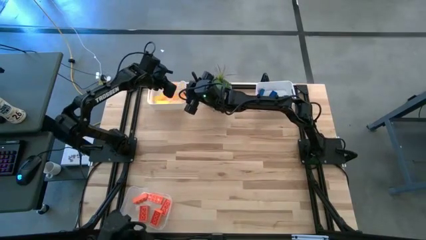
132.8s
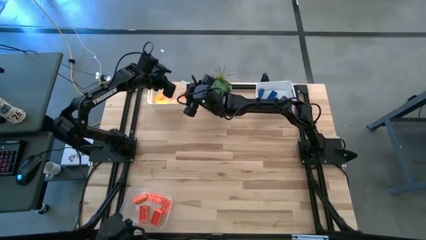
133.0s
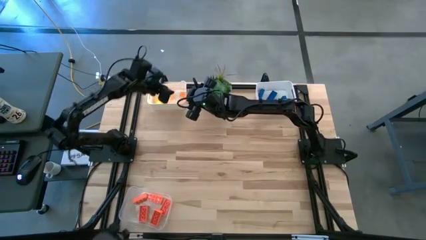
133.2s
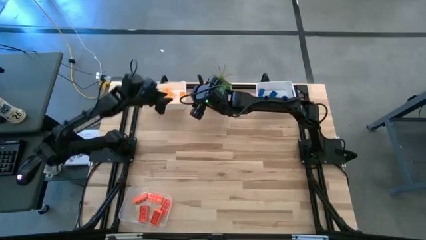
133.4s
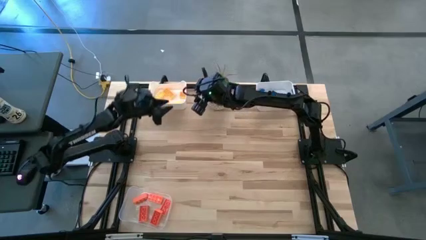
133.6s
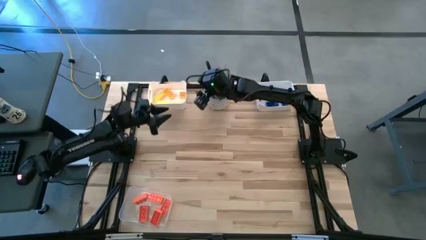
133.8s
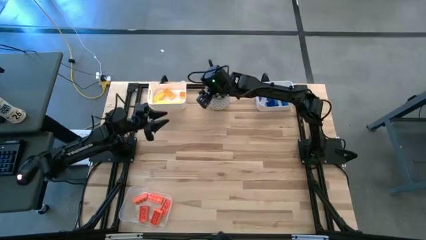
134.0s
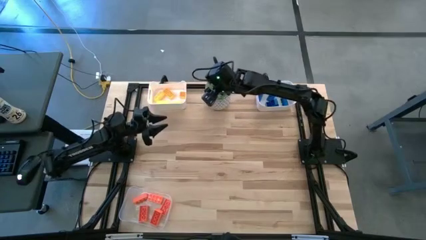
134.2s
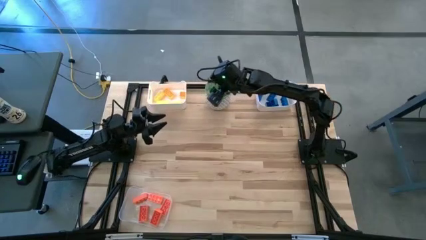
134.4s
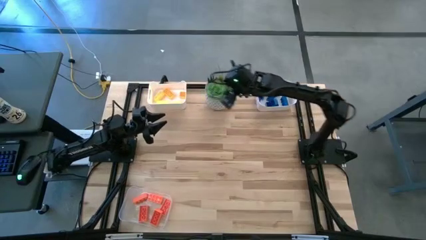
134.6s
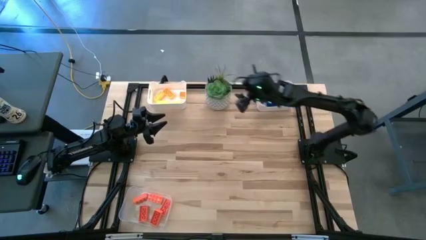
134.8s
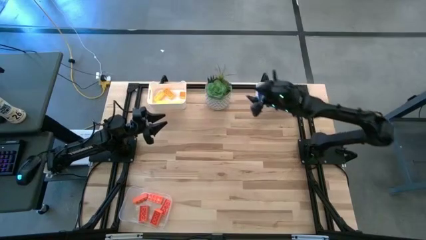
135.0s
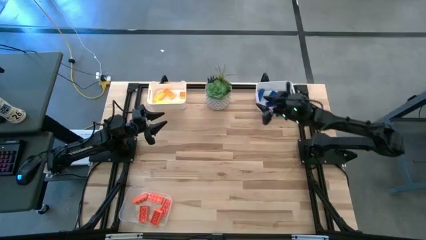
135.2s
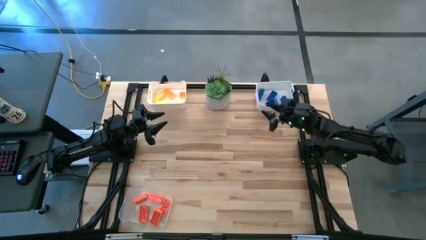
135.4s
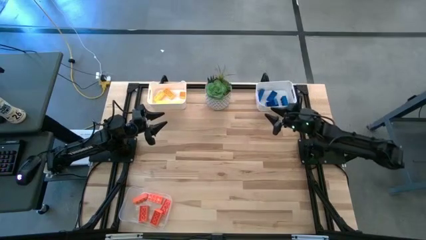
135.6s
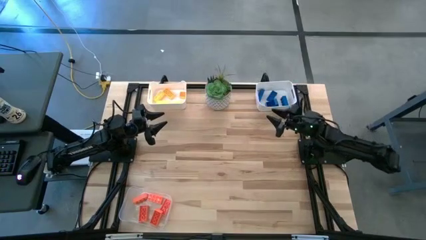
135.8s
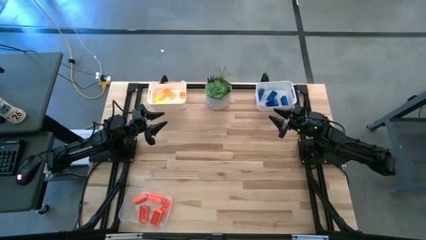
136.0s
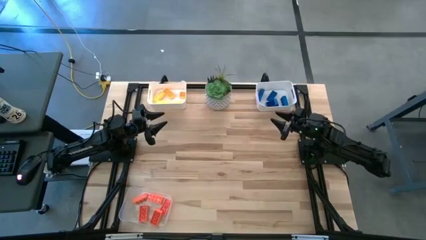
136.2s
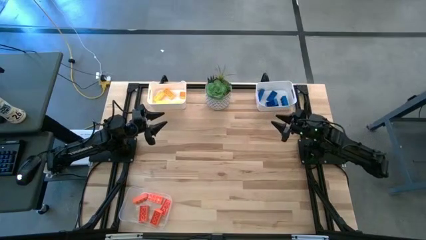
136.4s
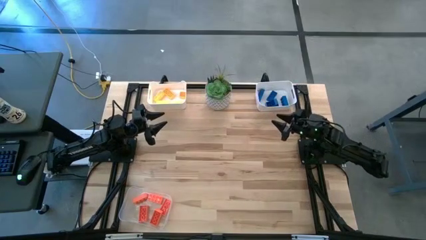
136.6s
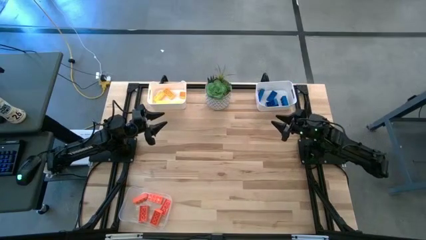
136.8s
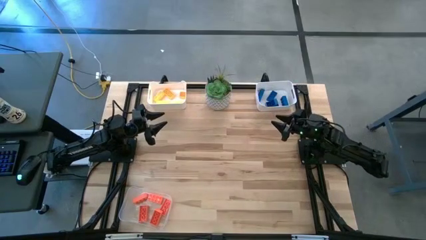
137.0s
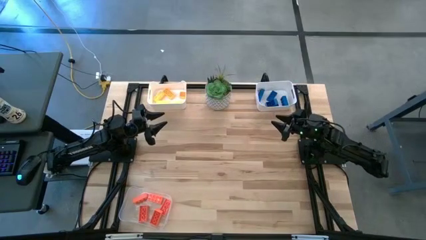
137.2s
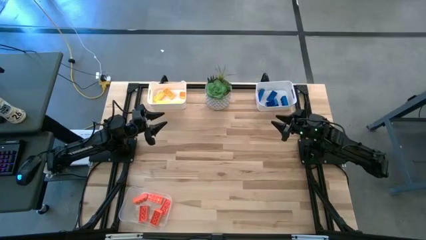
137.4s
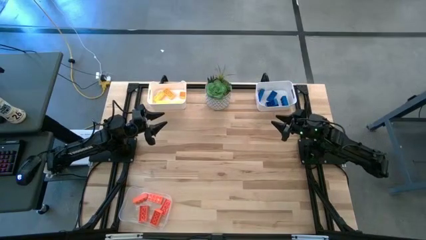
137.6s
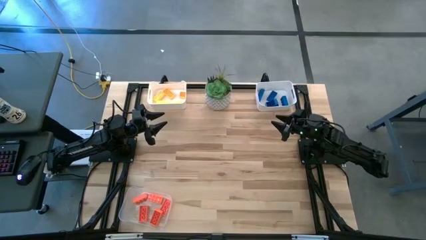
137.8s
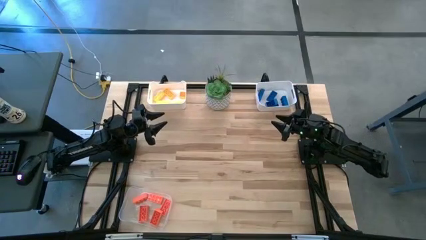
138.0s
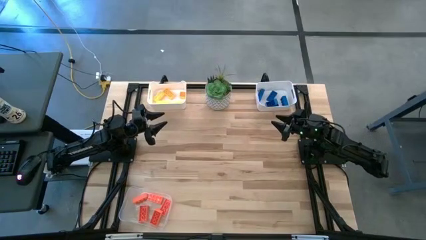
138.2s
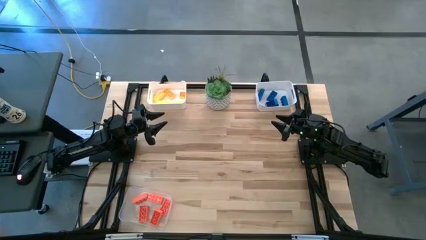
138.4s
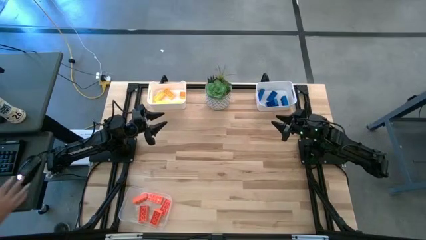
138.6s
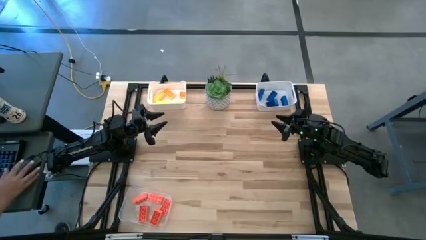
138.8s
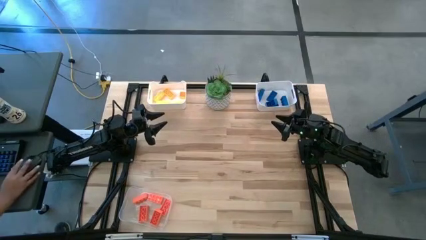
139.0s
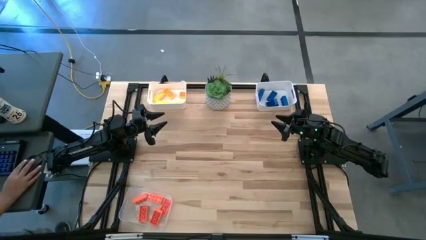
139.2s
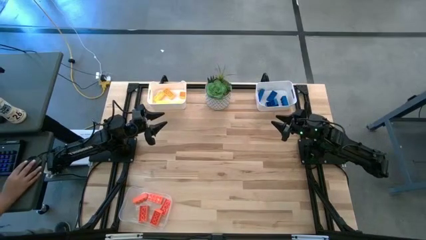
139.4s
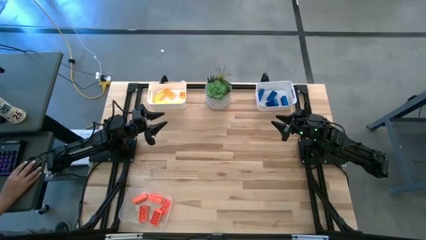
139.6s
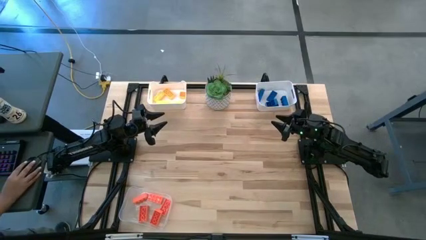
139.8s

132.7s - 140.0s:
Task: Sort & place blocks by color
Return to Home Position

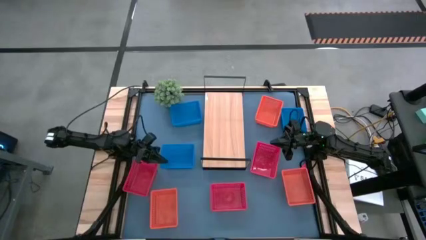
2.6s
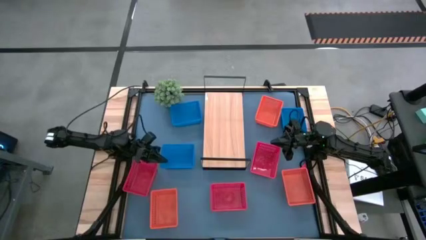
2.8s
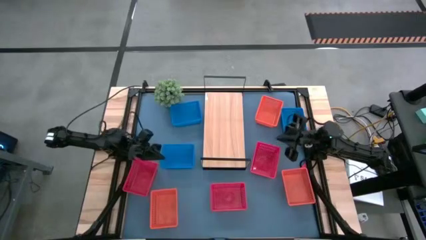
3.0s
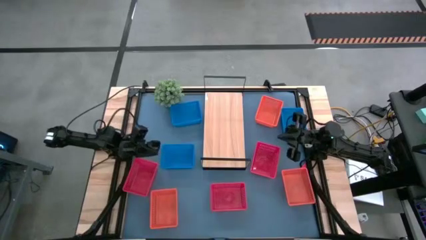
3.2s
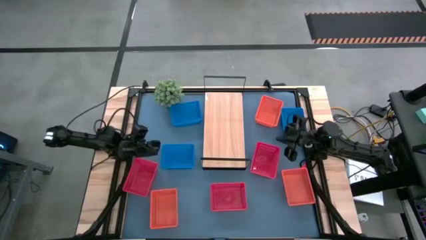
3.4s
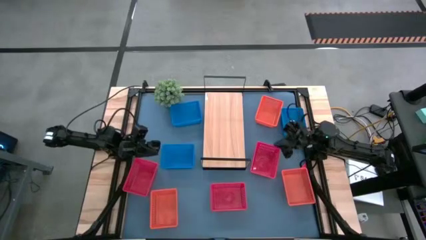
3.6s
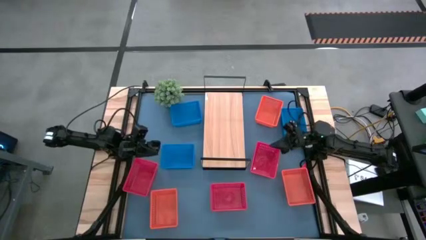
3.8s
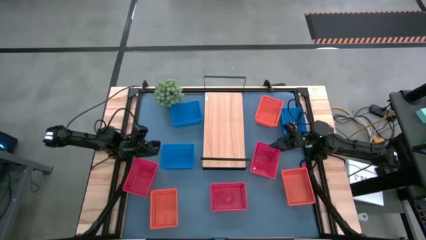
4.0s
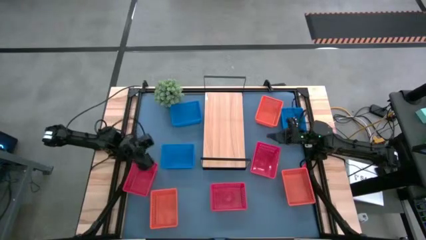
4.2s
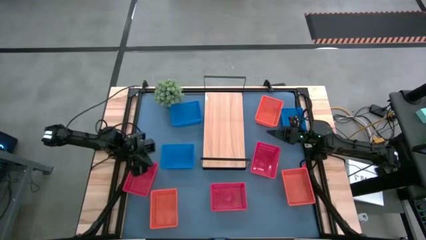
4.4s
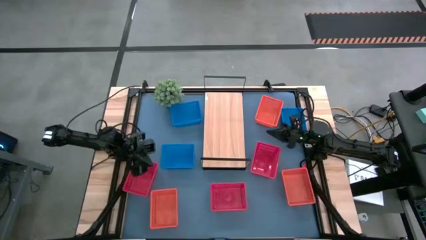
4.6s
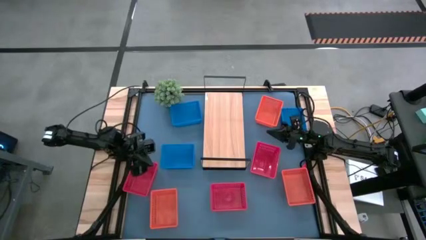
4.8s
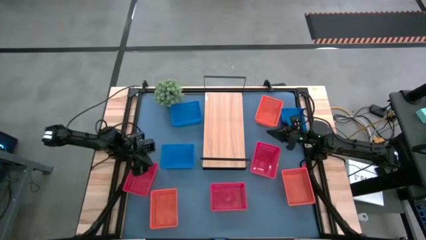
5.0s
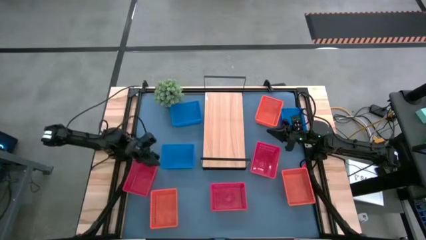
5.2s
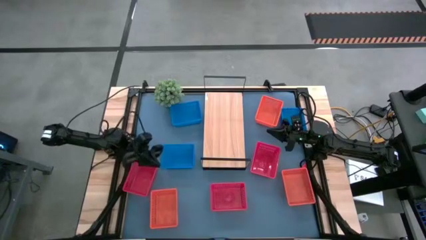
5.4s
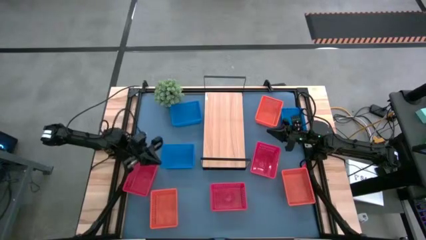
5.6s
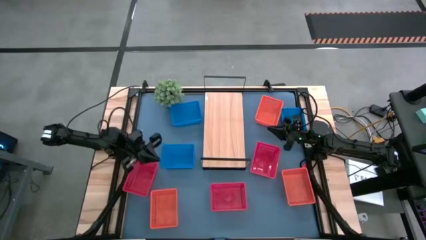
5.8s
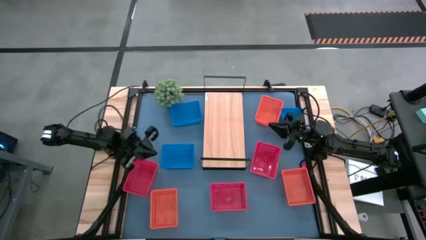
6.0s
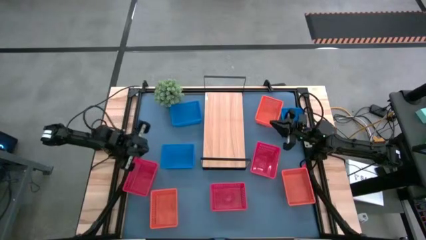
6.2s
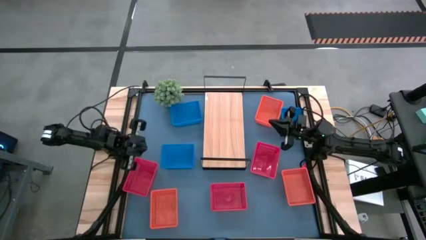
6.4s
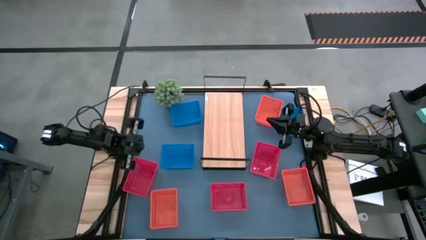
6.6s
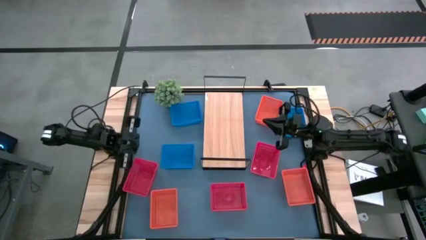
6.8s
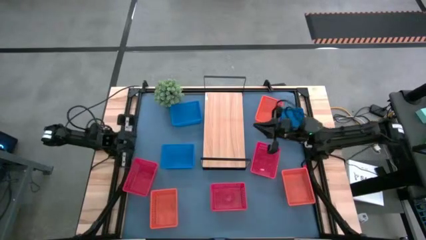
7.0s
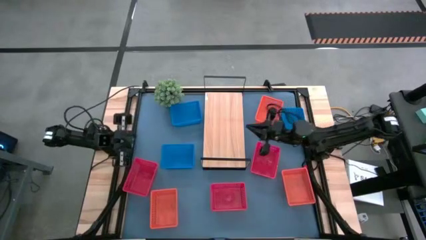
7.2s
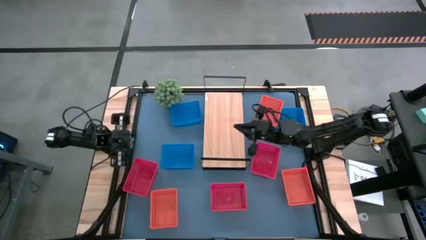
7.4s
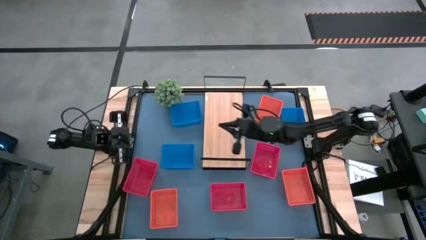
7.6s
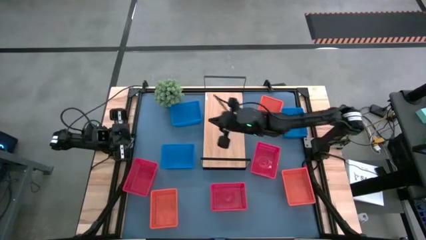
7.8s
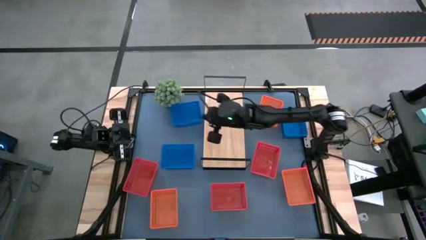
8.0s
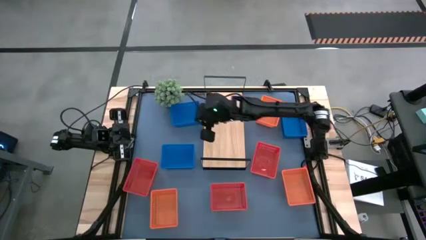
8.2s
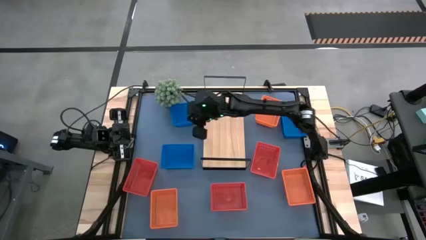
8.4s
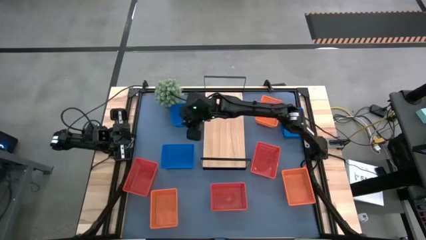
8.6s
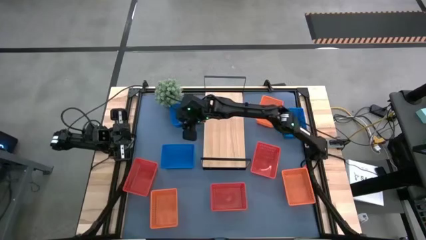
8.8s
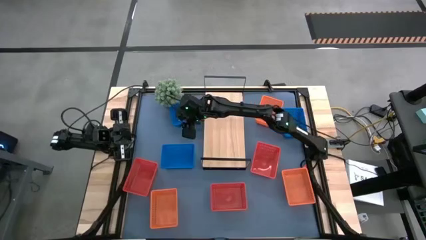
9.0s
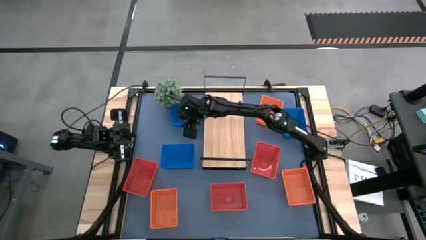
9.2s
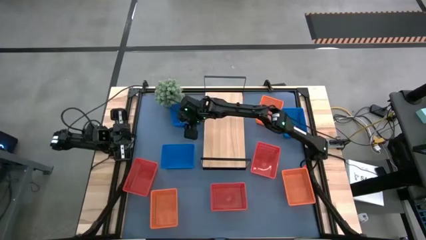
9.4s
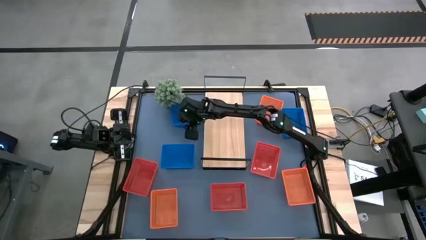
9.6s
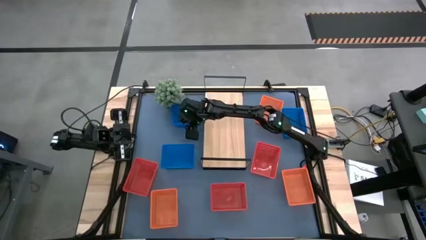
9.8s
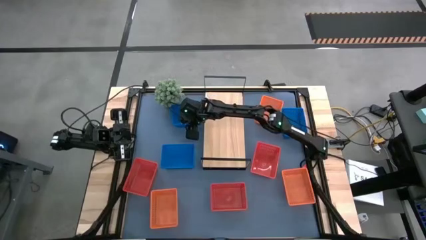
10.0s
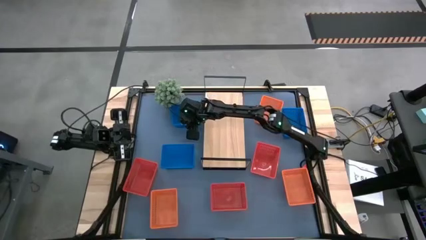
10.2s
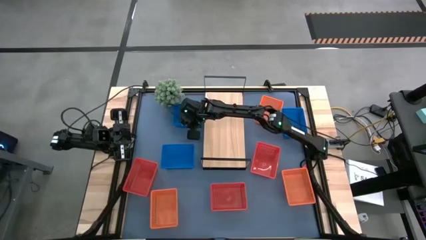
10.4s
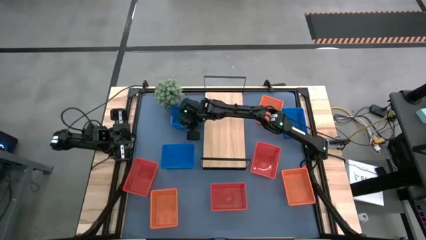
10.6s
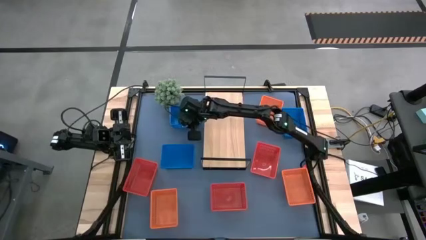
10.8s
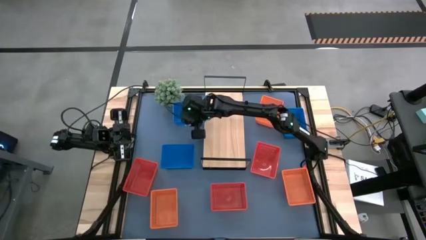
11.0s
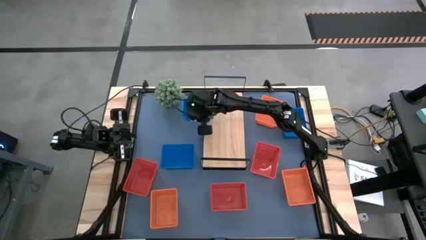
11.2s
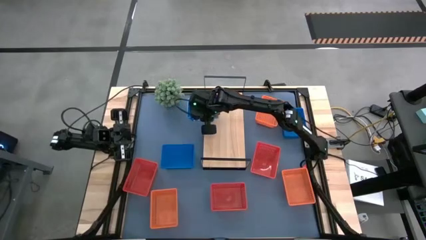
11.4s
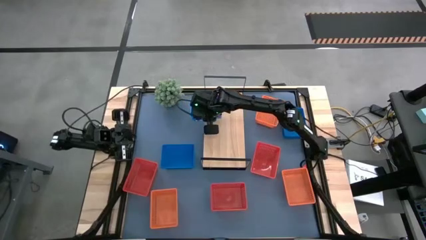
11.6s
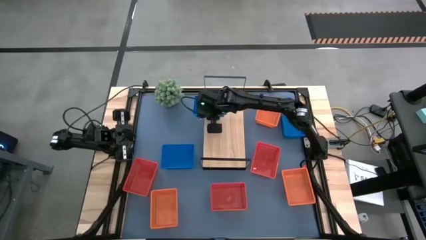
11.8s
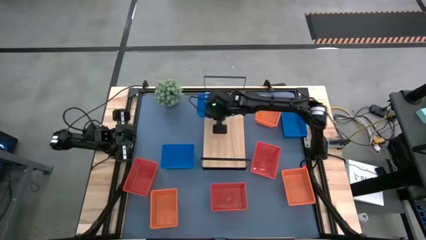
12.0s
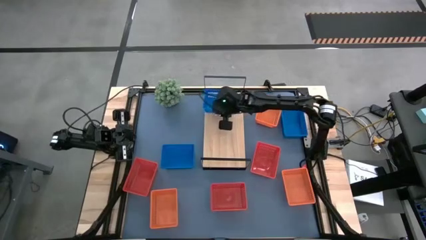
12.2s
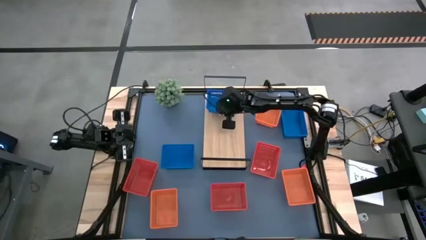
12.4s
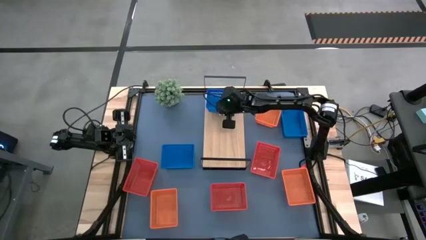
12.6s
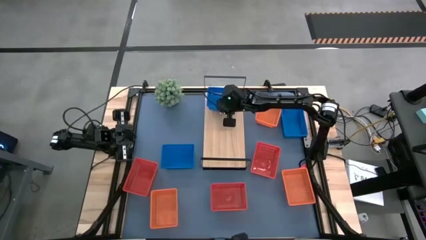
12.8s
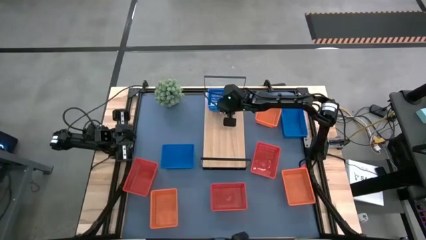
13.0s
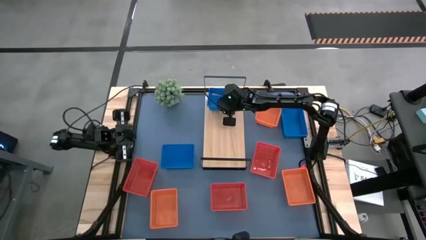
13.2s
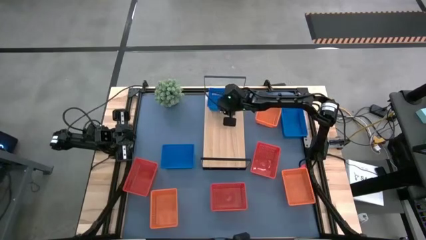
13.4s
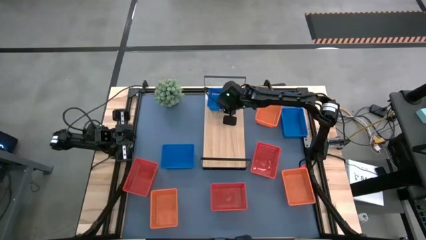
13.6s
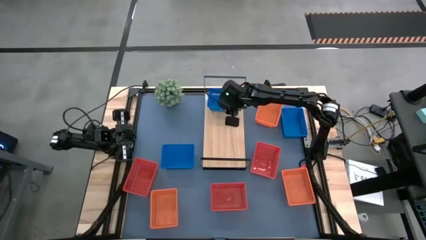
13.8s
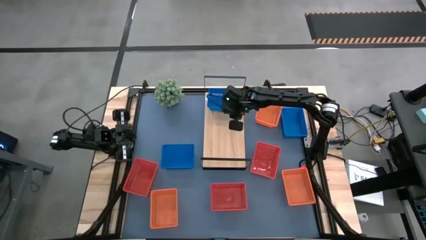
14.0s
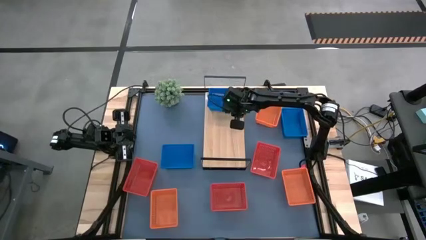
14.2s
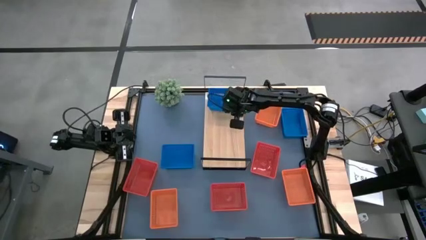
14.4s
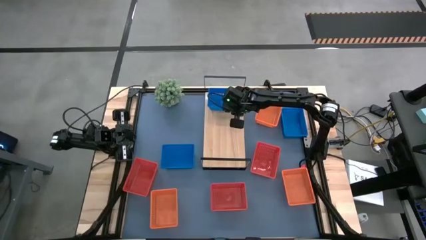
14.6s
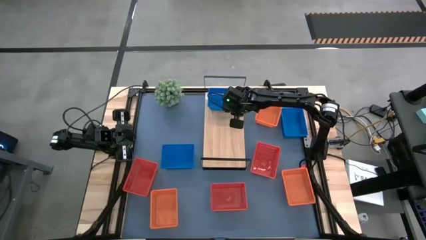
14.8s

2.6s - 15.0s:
Task: Stack baskets on shelf by color
Put the top left blue bin on the shelf
